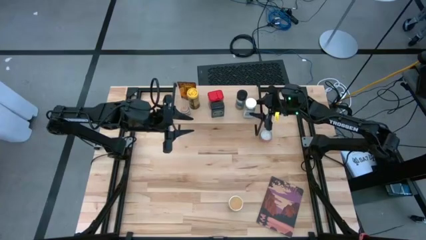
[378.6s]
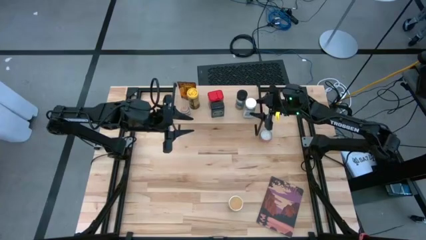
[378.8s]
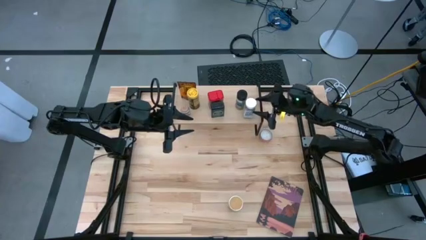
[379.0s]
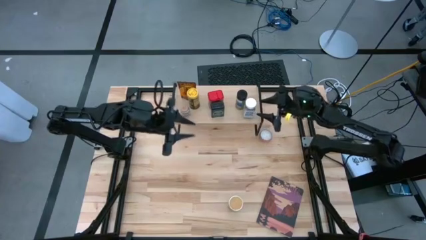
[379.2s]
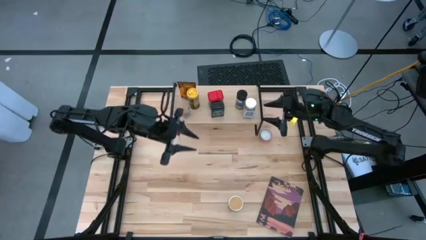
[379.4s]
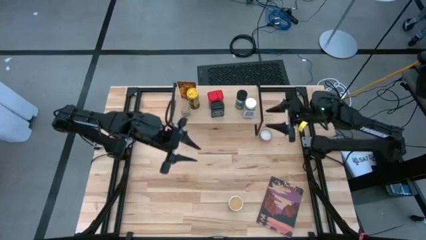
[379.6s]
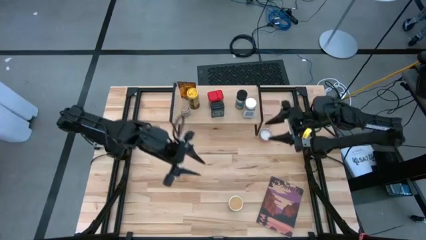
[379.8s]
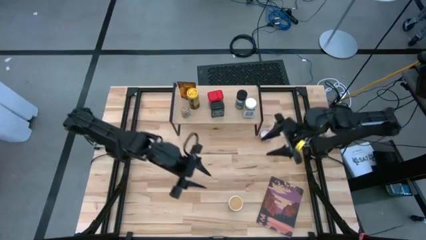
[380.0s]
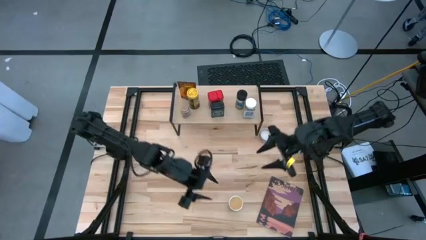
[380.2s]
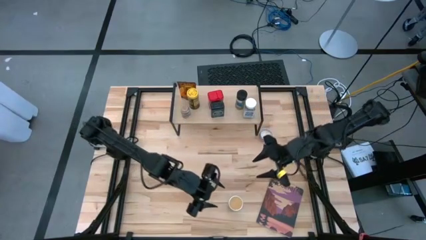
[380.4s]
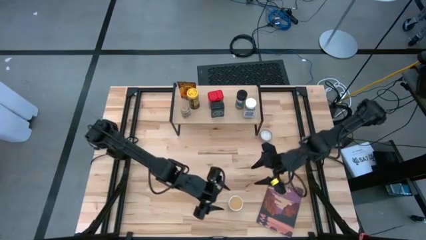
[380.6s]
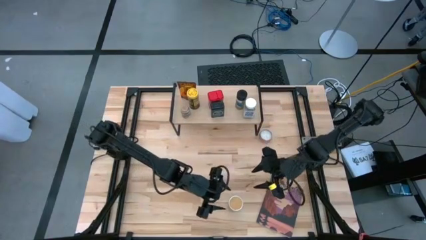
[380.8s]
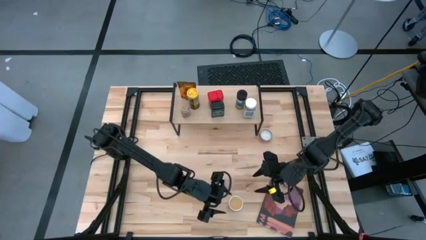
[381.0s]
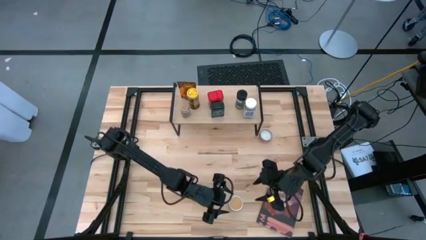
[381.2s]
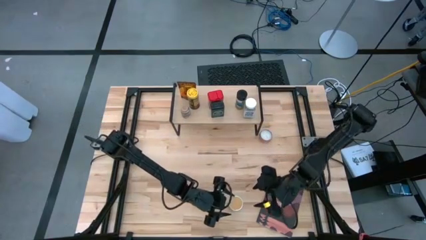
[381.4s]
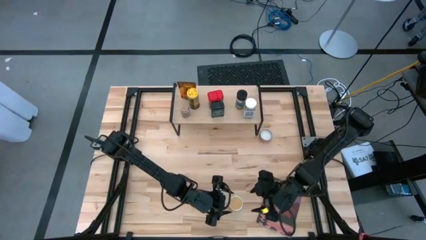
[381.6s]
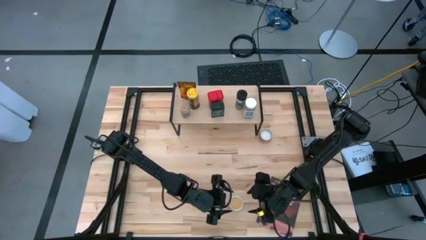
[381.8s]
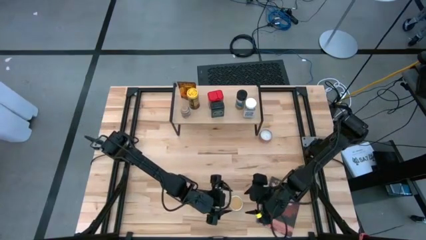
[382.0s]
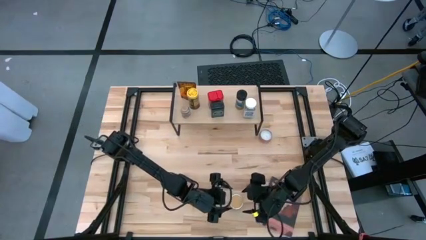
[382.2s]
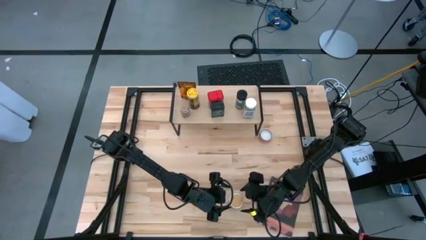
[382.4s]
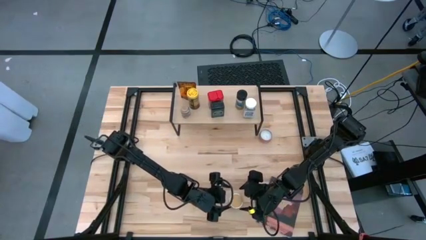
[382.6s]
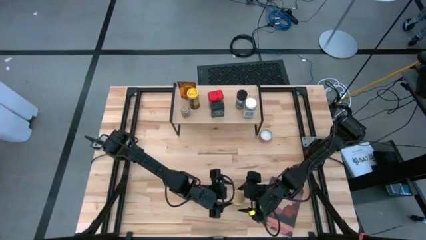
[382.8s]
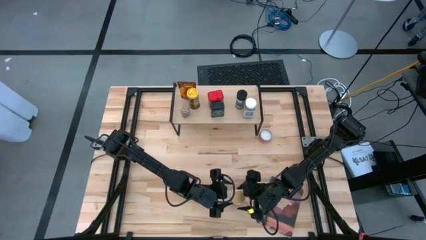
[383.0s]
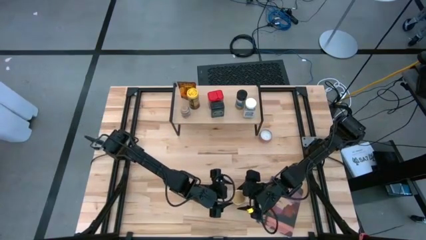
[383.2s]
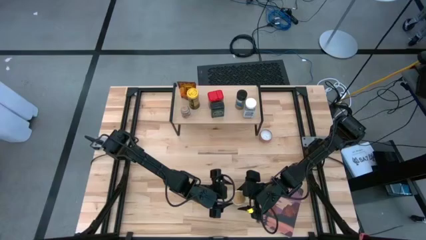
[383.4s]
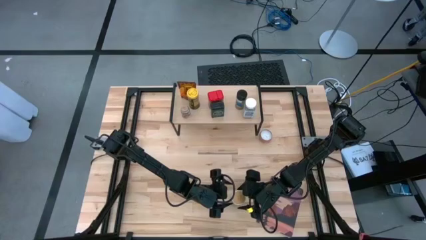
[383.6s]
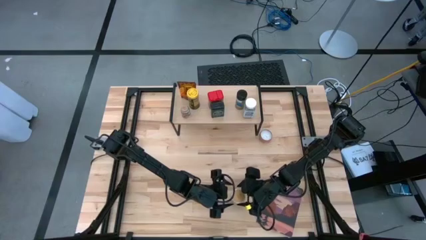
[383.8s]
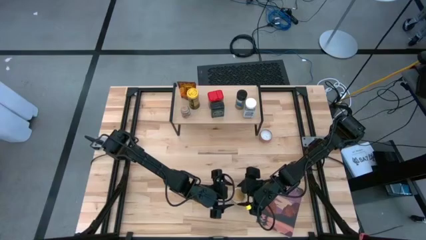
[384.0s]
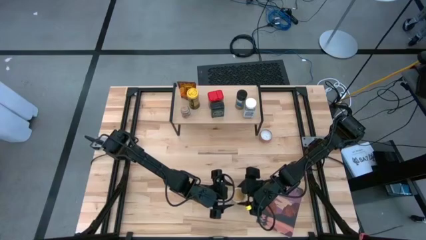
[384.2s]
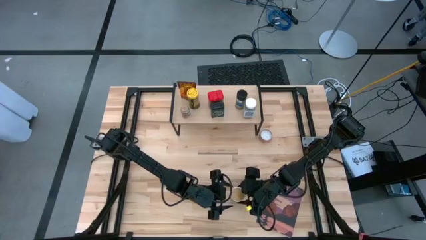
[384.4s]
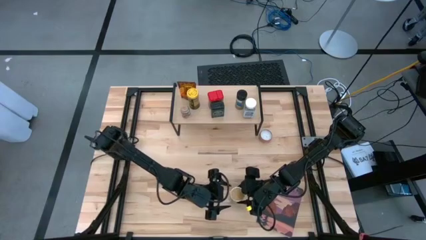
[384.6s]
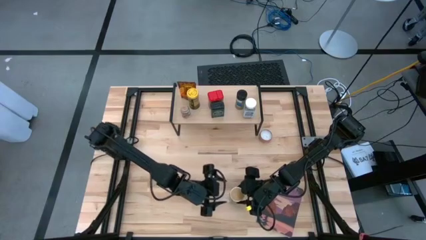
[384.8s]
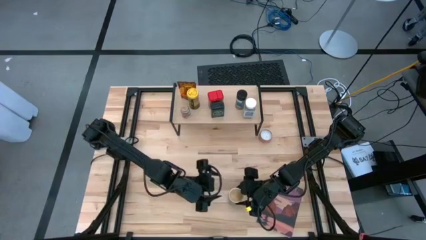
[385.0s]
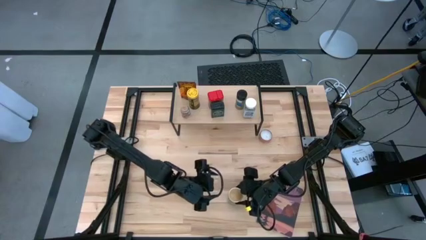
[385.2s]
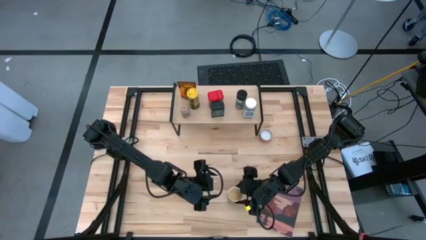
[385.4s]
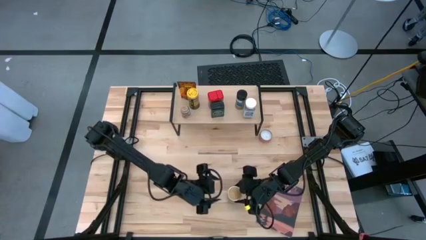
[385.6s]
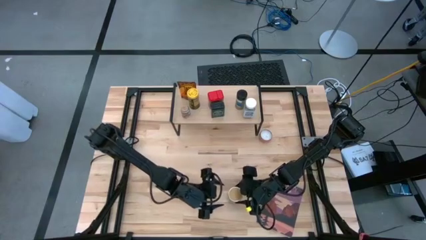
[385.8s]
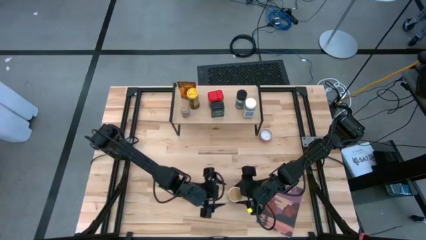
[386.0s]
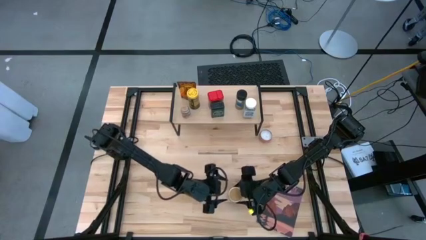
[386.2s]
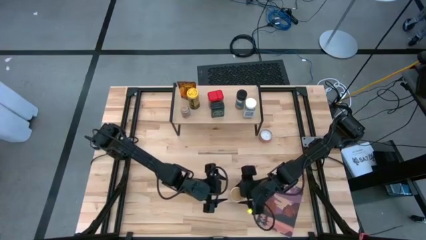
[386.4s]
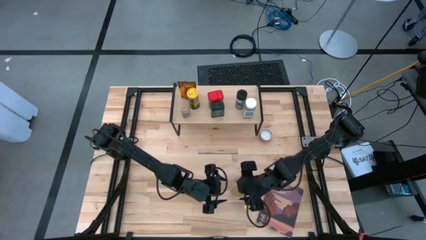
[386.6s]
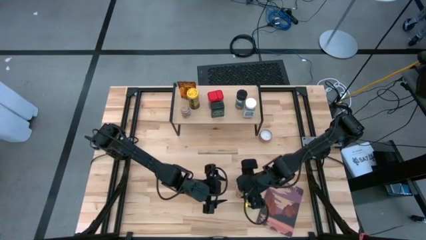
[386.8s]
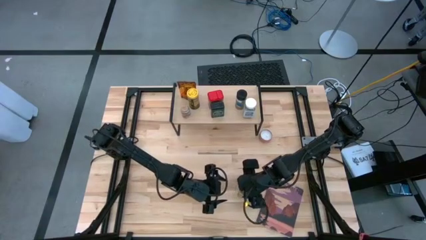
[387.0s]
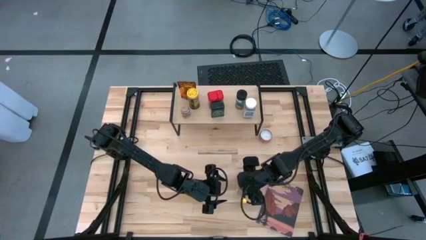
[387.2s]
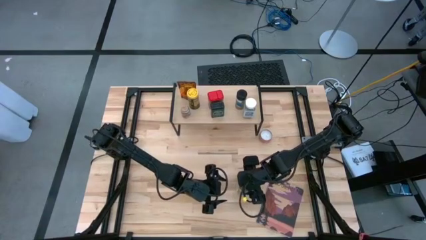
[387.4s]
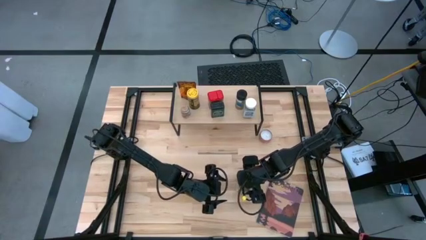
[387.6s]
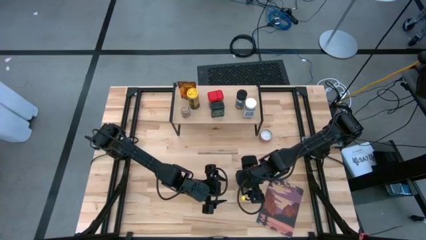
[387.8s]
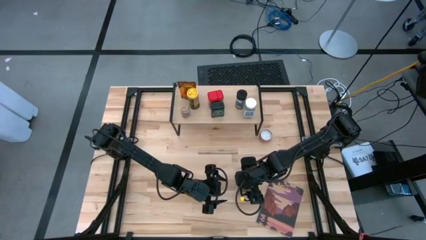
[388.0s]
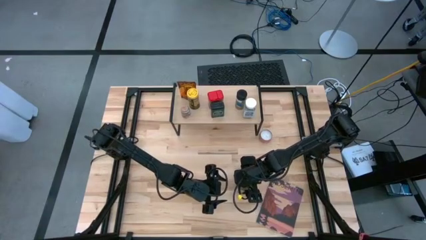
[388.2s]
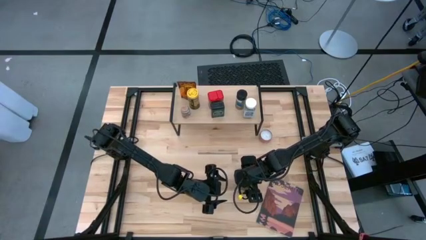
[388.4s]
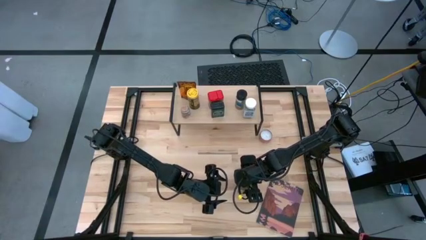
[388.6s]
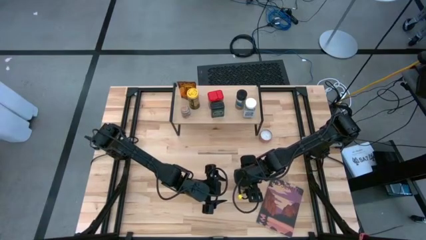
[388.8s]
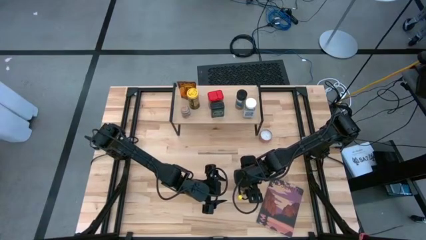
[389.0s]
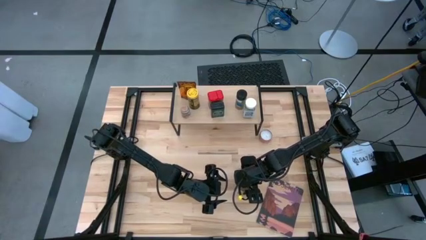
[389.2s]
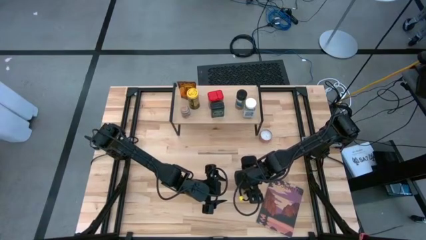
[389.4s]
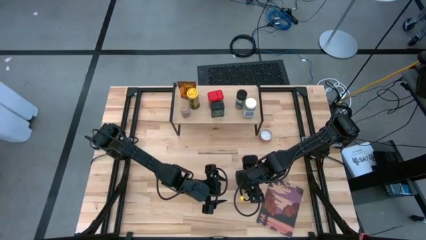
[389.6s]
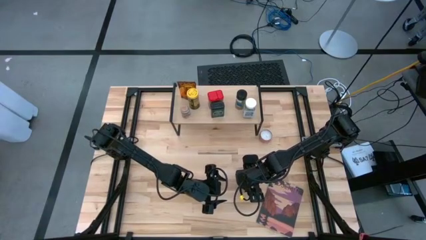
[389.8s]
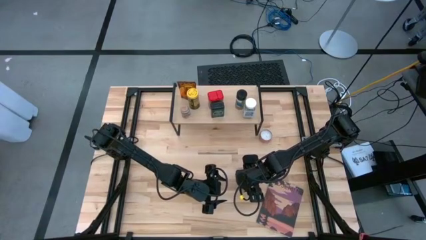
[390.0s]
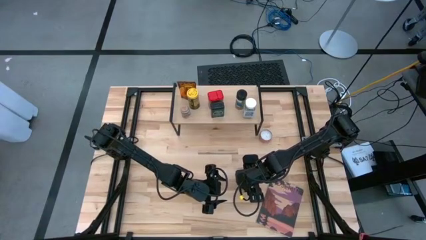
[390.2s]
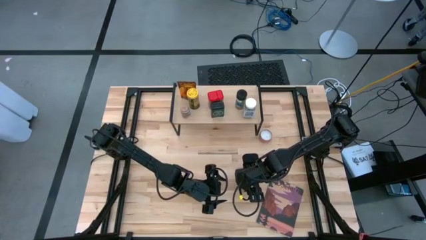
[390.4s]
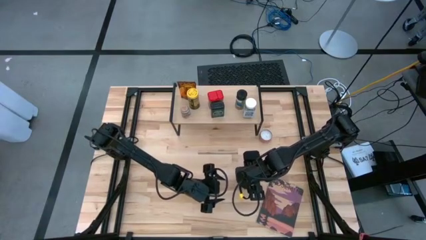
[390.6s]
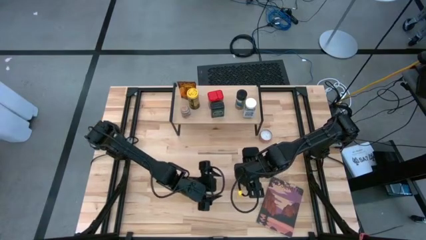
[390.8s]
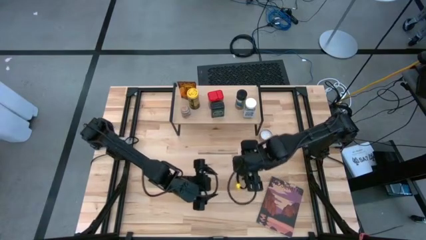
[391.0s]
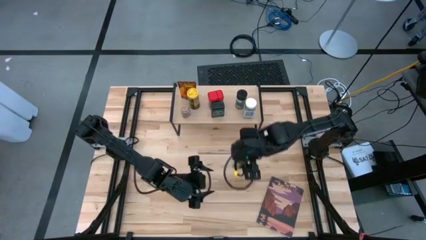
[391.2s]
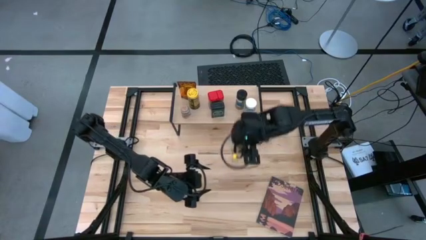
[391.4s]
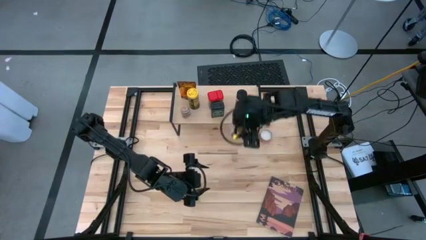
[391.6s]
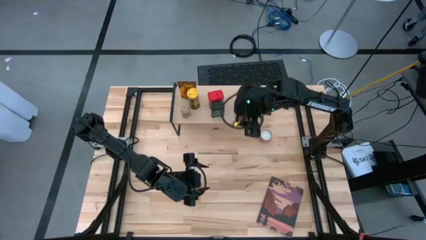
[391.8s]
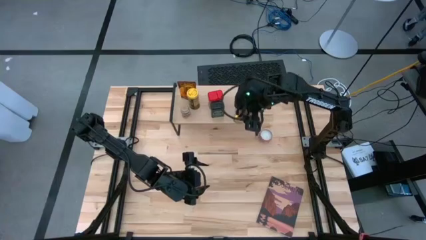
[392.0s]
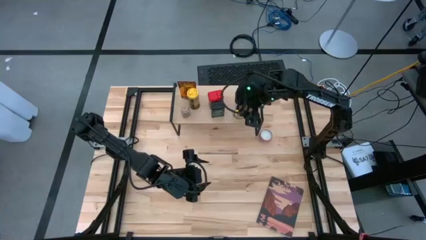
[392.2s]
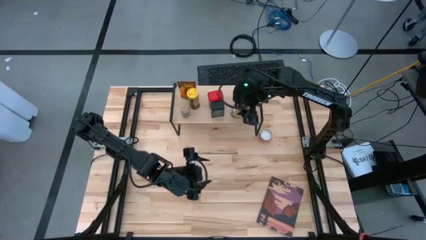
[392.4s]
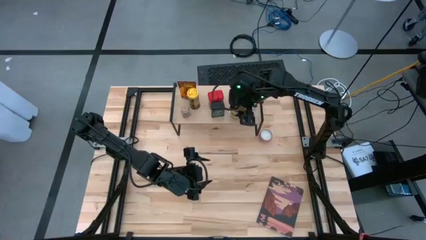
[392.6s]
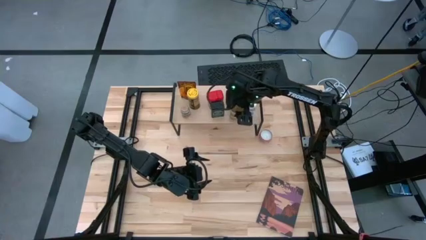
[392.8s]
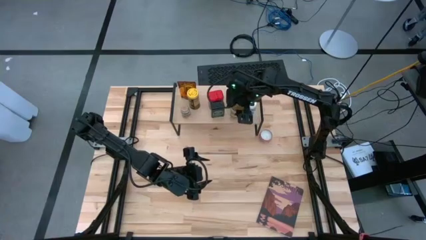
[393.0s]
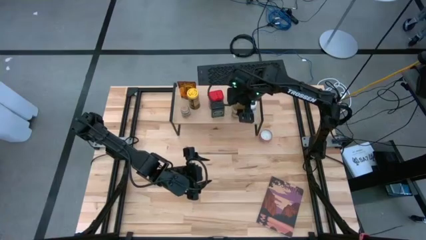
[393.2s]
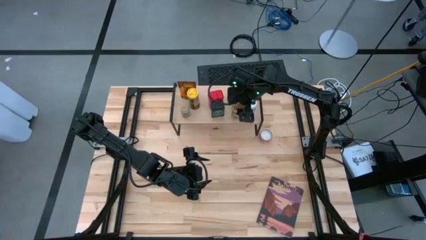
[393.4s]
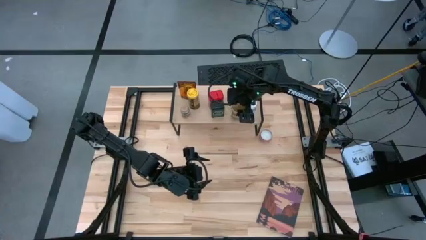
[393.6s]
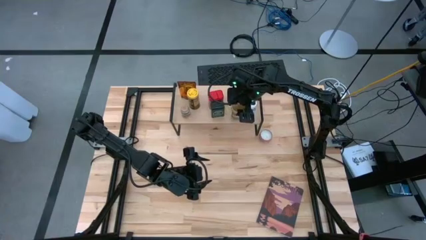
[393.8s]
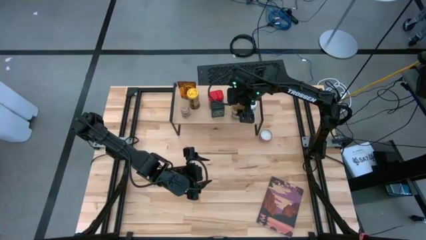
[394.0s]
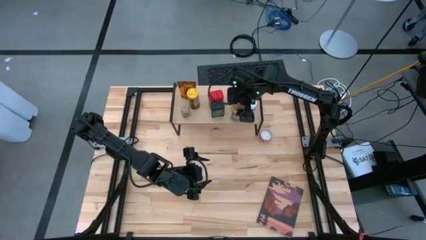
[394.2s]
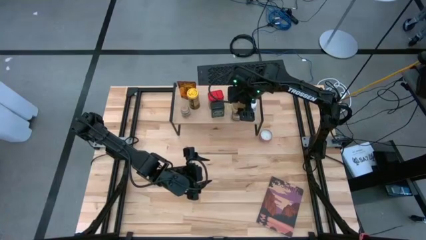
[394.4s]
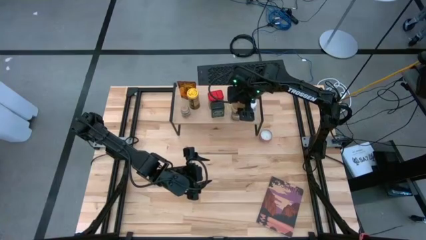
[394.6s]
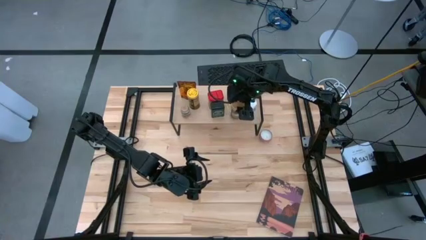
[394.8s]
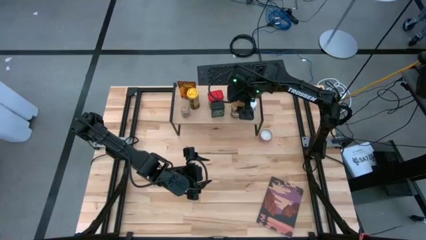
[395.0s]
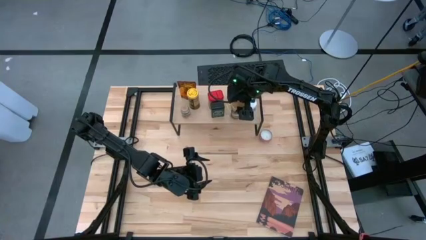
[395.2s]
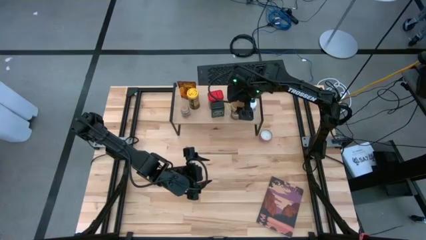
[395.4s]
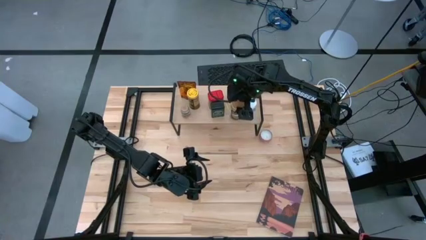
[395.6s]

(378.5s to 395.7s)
Task: Shelf spices
Put the brown spice bottle on the shelf
